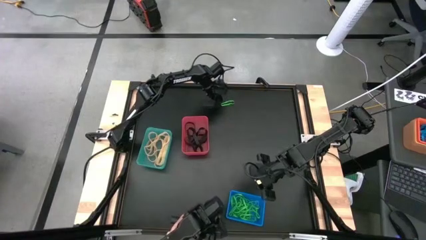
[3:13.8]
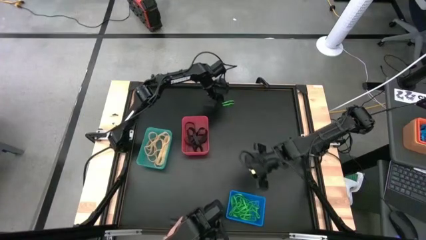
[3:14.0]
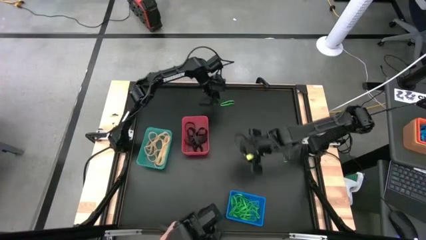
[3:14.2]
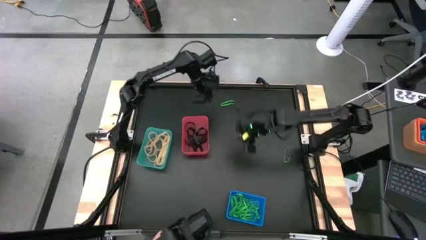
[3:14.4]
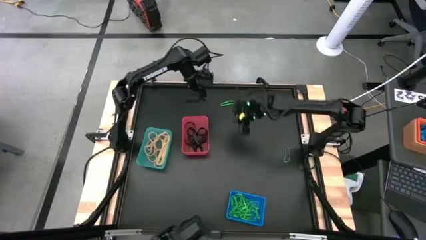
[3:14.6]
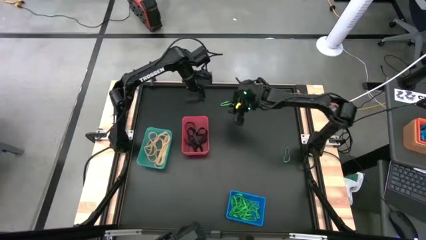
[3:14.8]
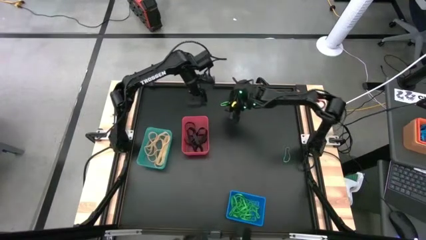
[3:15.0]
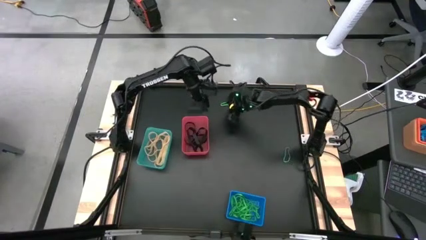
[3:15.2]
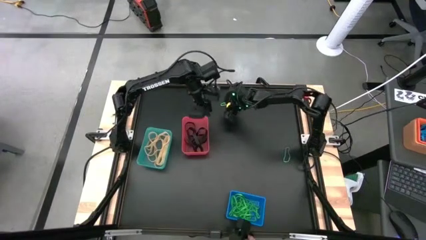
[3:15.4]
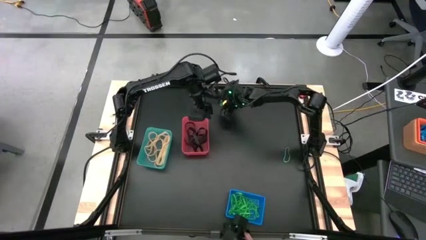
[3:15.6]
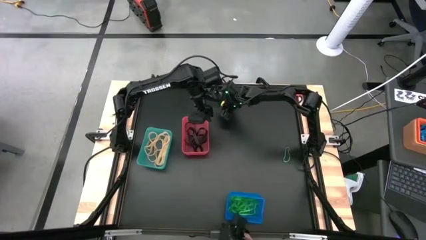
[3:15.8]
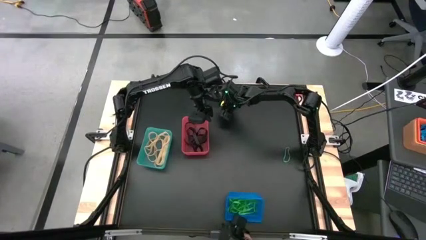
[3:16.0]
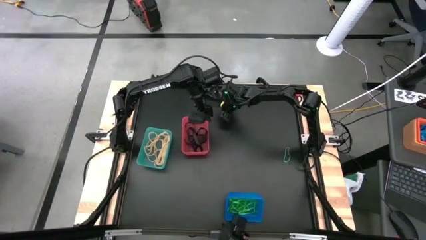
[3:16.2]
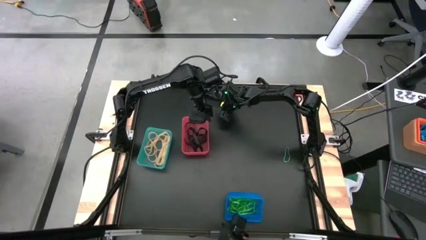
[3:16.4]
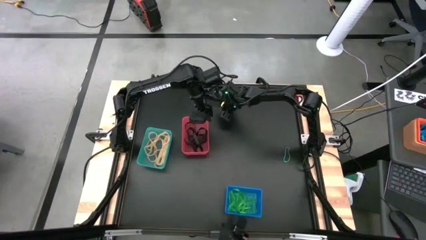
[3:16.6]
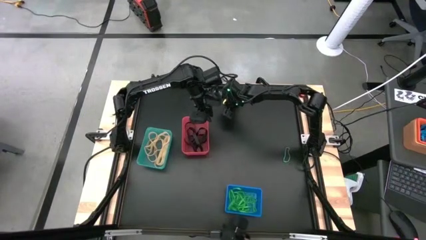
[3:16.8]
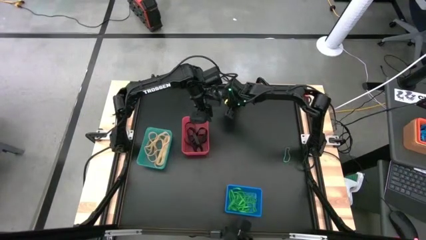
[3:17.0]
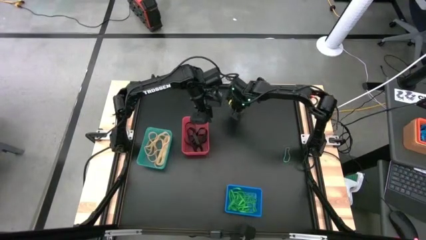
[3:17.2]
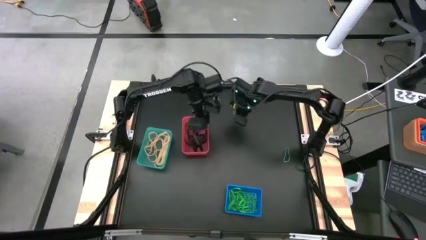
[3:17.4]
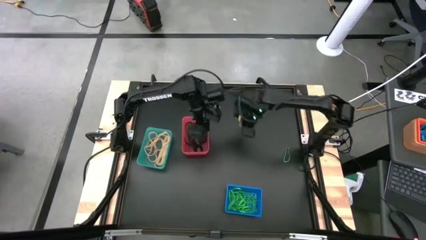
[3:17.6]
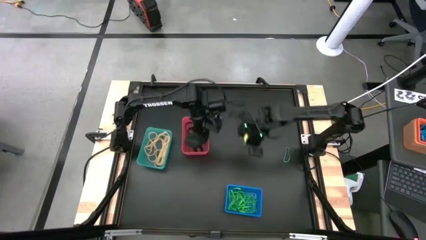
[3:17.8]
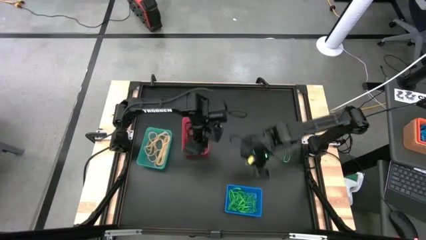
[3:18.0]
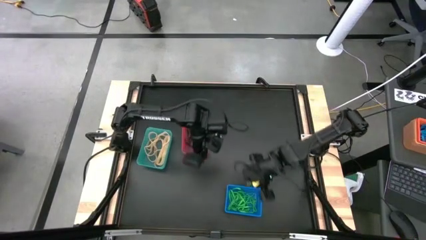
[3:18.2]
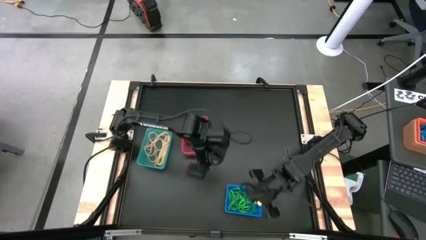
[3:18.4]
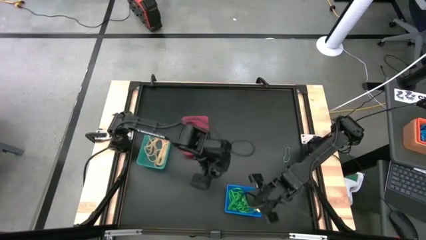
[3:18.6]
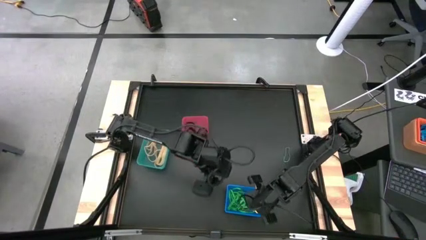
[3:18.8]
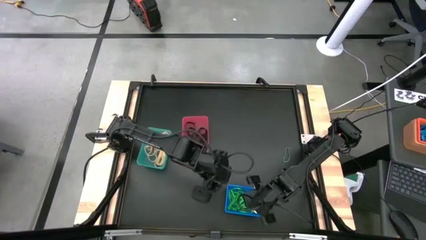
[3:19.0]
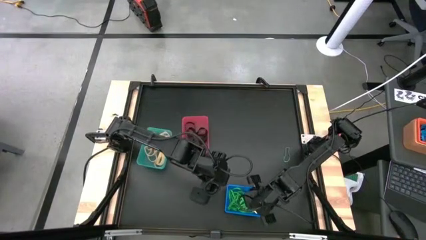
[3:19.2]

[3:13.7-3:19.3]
Task: Sort rubber bands into baskets
Put the green rubber band into the blue bin

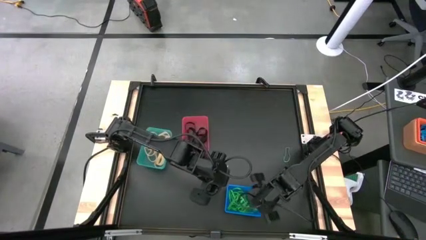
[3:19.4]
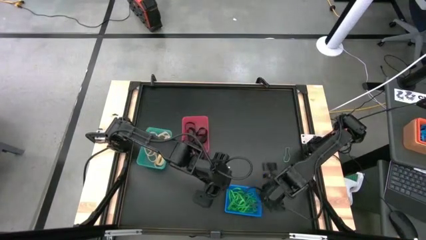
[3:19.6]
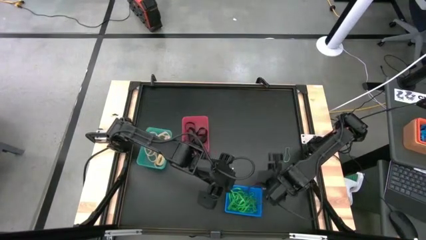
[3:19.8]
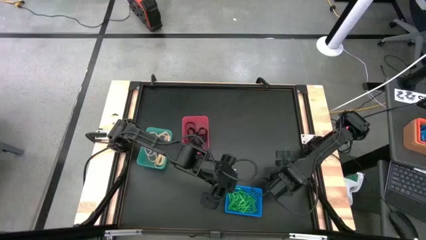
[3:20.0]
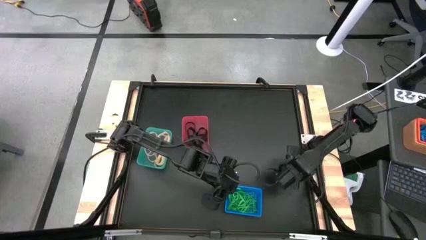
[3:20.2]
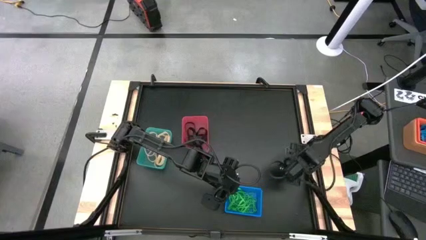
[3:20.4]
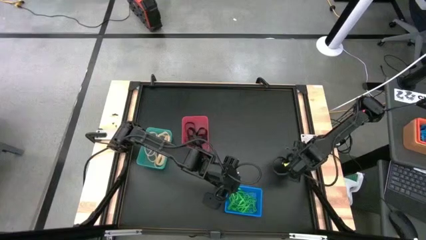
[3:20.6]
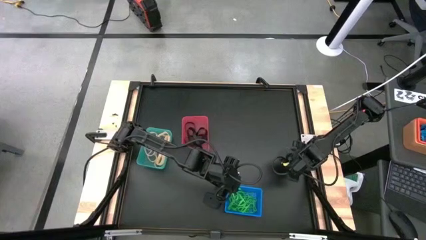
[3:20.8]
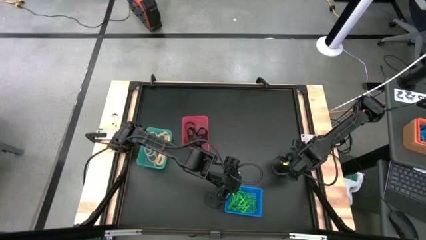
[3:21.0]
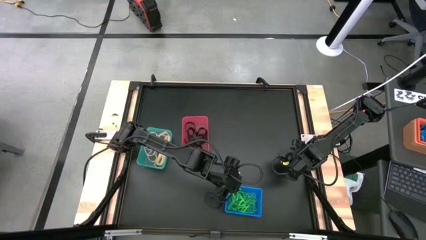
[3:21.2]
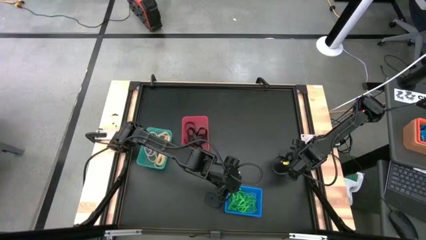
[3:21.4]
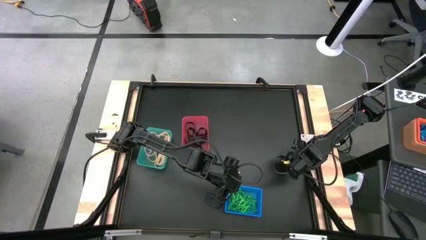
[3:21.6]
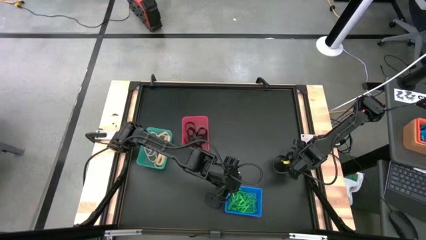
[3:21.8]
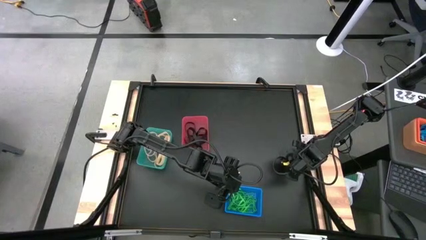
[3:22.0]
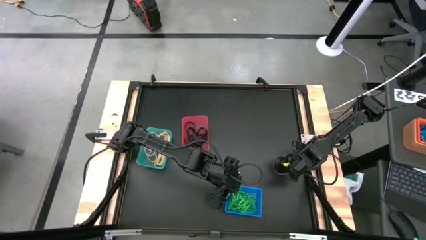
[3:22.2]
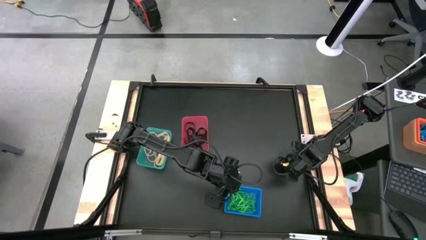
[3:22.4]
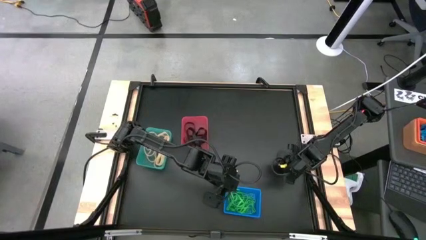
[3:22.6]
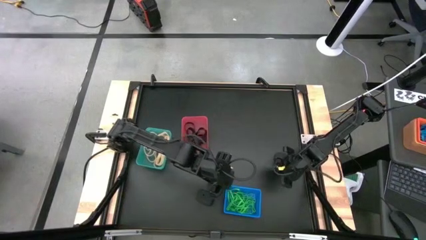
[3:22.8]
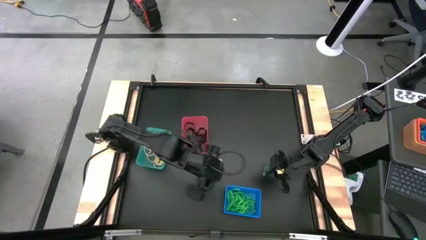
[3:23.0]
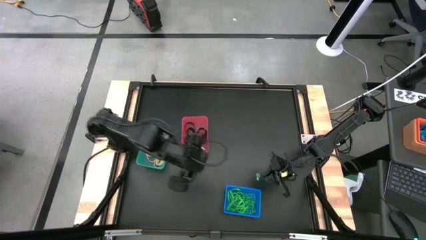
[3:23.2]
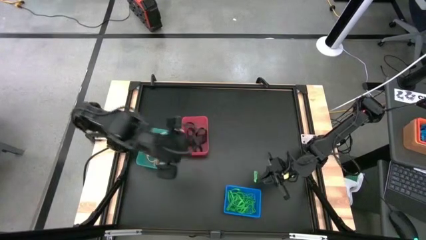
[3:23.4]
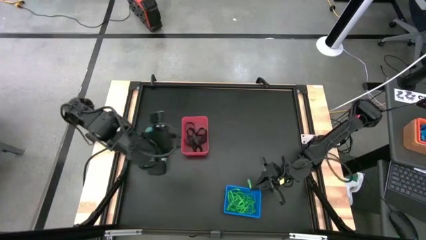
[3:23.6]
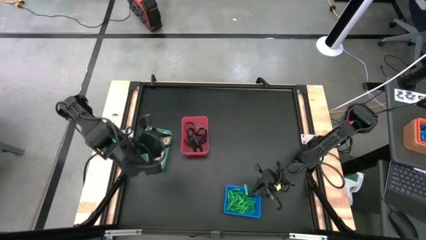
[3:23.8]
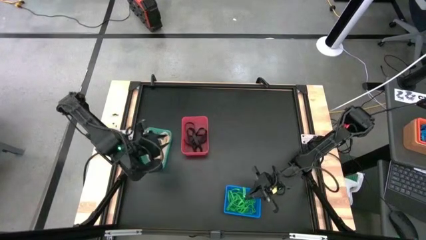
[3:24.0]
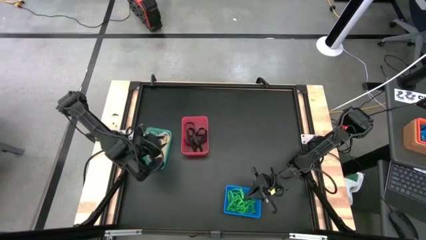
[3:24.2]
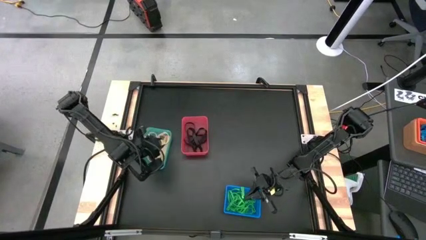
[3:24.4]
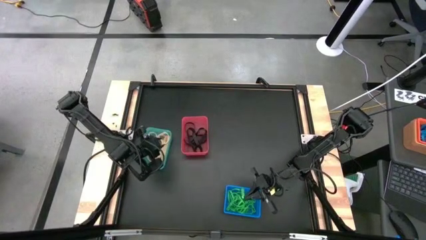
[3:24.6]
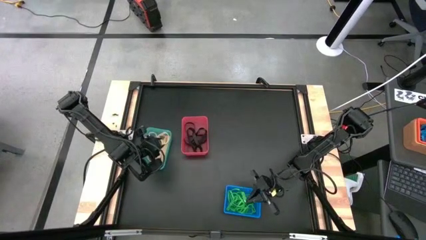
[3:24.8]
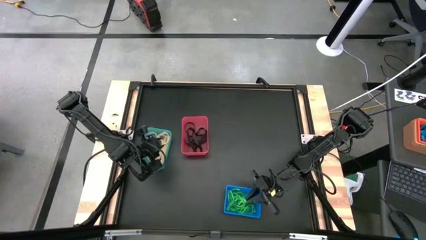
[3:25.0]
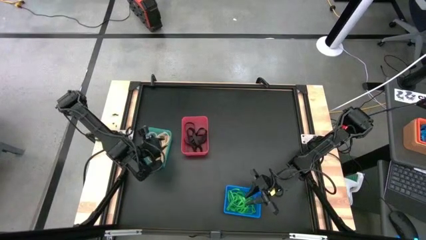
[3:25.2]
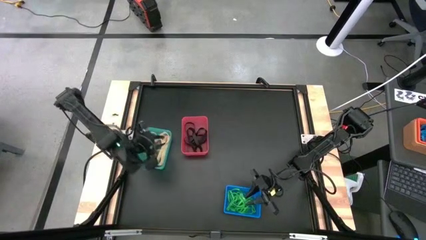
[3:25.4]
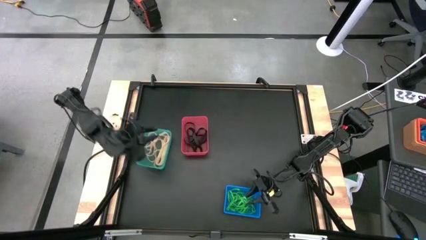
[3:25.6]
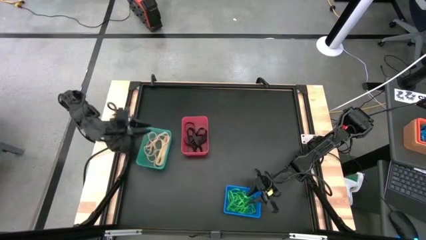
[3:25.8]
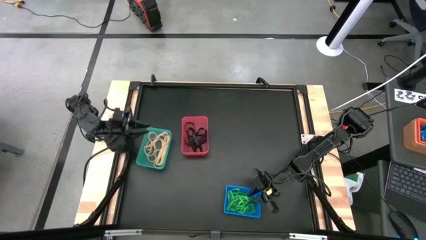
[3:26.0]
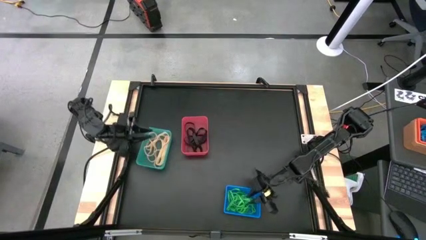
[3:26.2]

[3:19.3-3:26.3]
Put the green rubber band into the blue bin

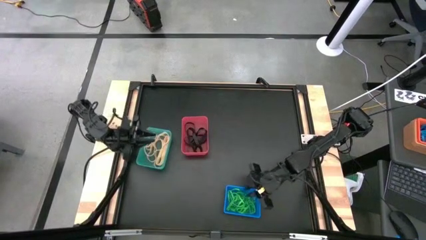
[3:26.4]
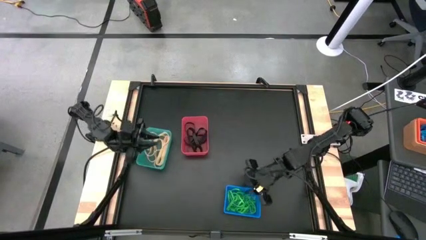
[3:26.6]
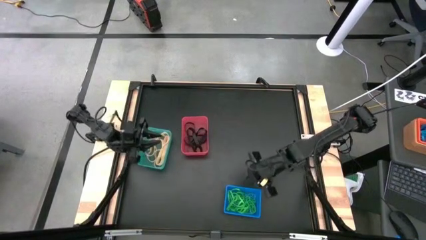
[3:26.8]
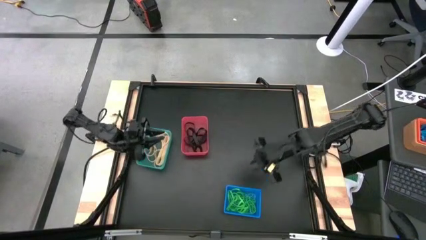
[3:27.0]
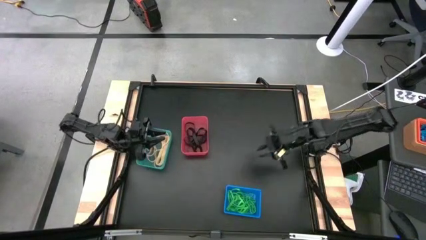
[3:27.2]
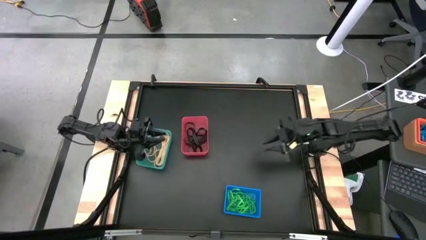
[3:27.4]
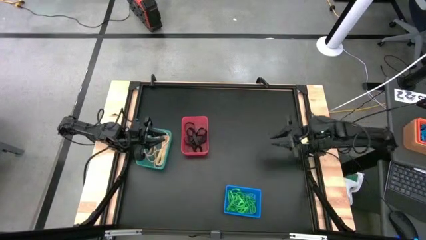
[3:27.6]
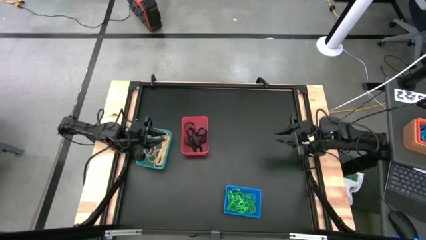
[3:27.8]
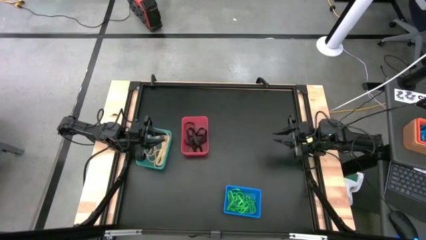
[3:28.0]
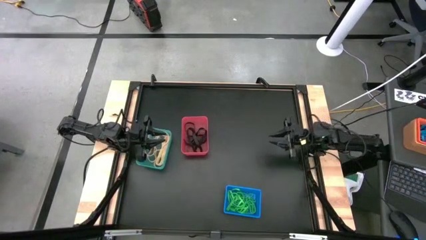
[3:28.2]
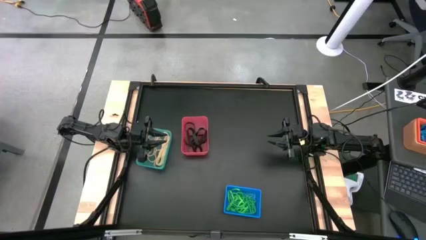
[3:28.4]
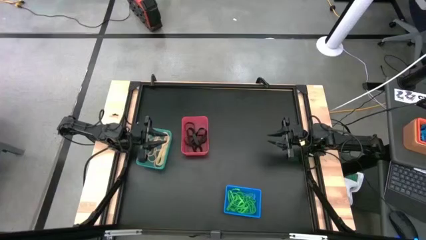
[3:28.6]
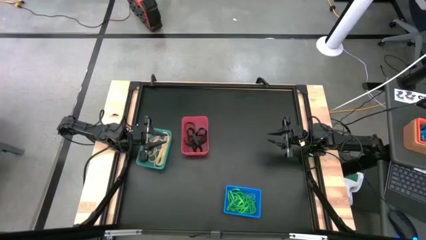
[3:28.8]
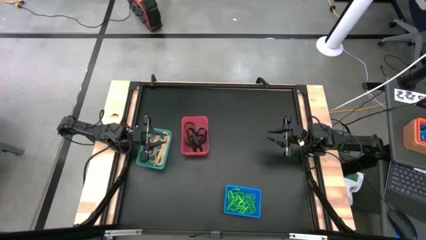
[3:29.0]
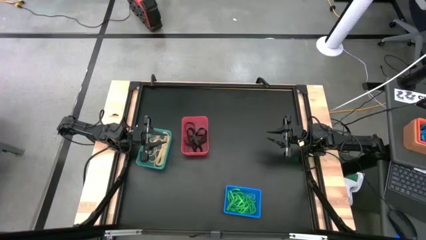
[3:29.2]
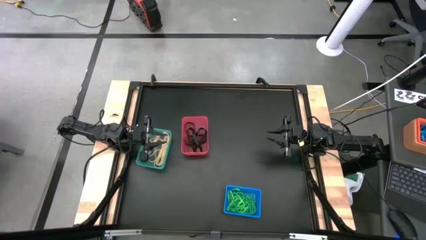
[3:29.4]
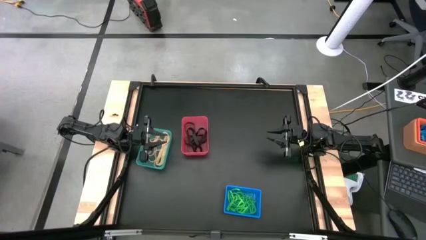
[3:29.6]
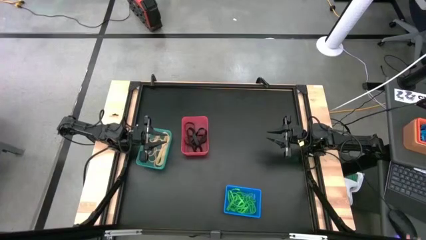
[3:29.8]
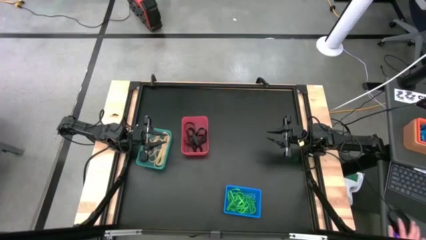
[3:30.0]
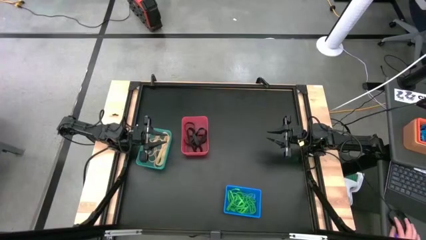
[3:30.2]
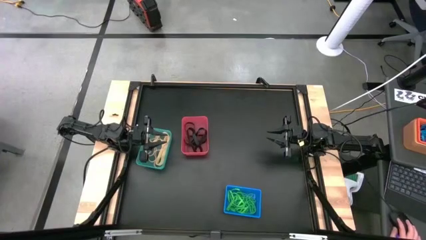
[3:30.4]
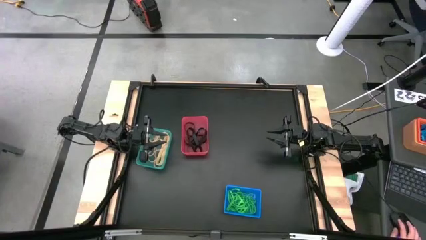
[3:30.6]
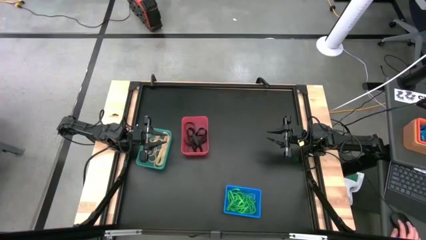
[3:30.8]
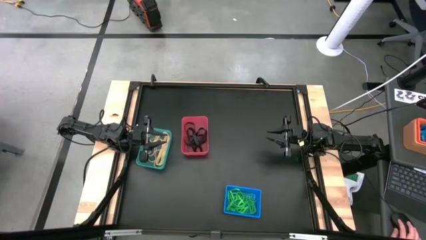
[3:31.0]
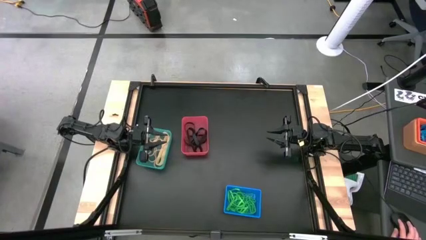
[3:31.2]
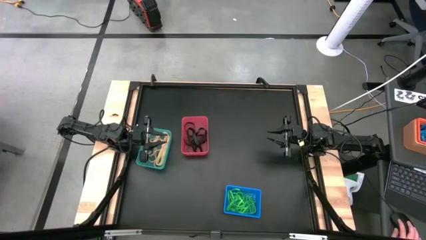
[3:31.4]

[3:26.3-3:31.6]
Return to Home Position
